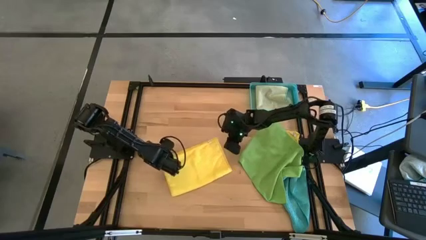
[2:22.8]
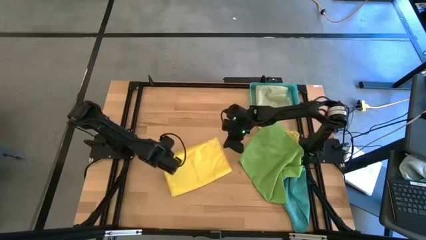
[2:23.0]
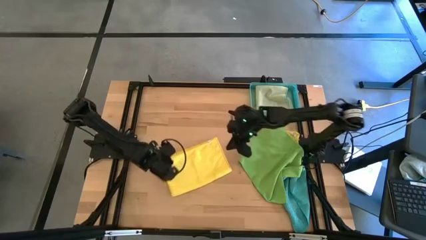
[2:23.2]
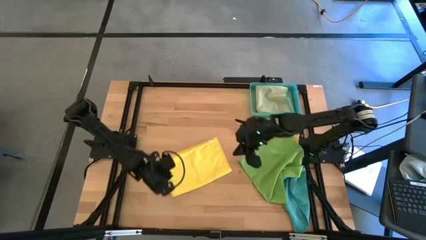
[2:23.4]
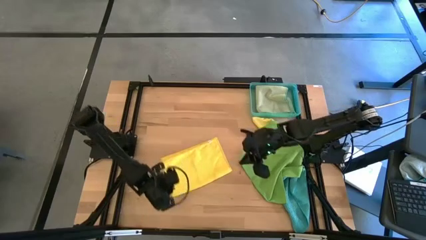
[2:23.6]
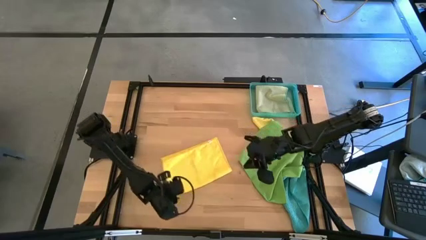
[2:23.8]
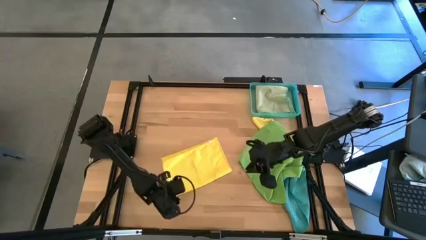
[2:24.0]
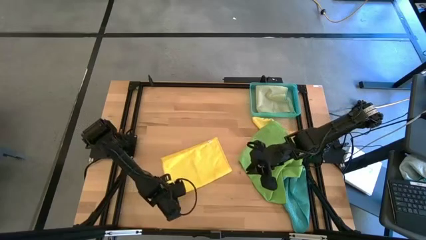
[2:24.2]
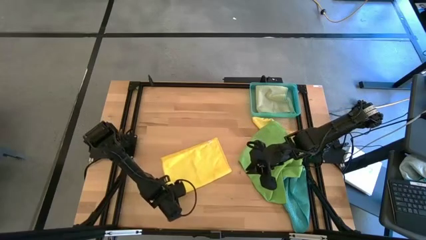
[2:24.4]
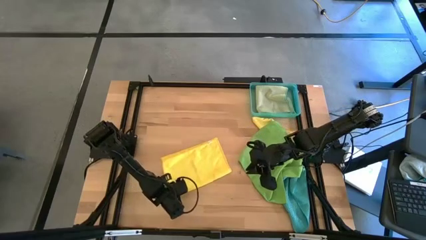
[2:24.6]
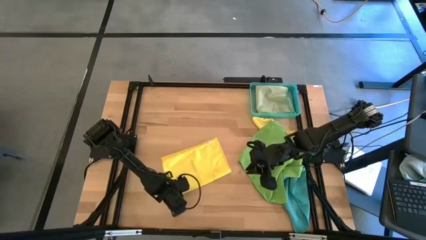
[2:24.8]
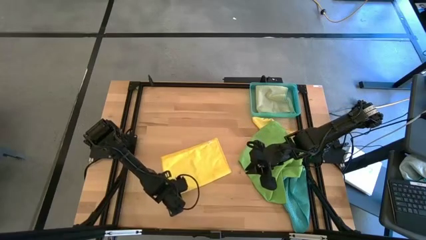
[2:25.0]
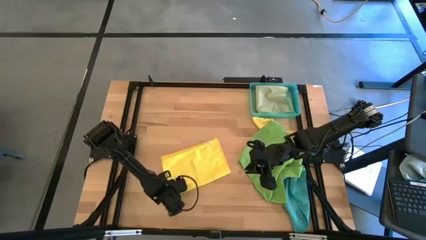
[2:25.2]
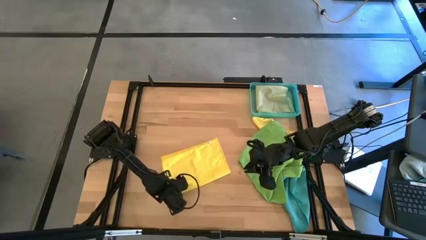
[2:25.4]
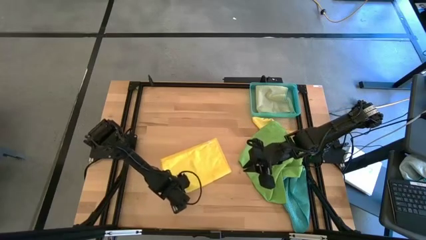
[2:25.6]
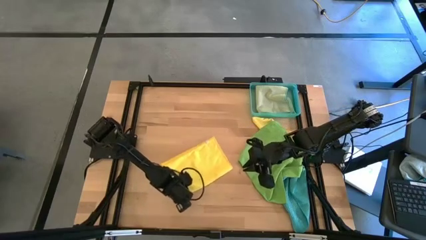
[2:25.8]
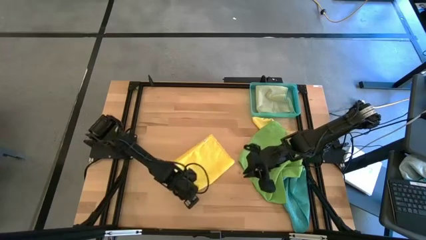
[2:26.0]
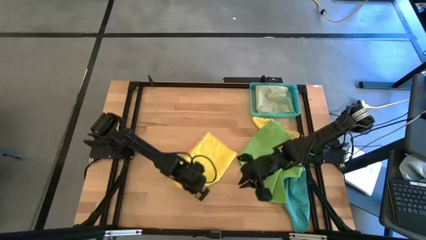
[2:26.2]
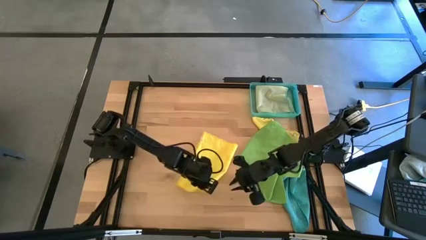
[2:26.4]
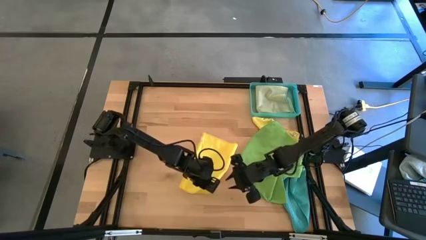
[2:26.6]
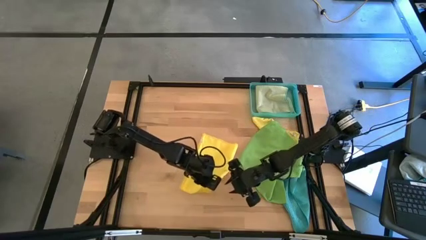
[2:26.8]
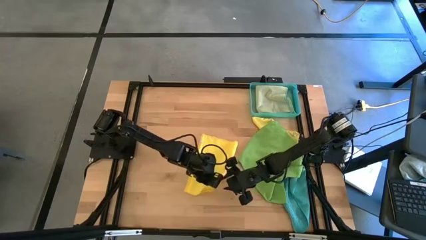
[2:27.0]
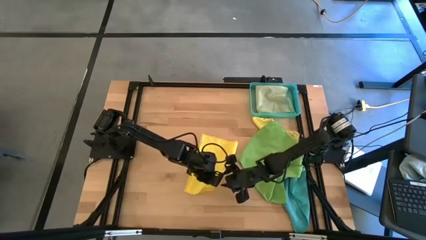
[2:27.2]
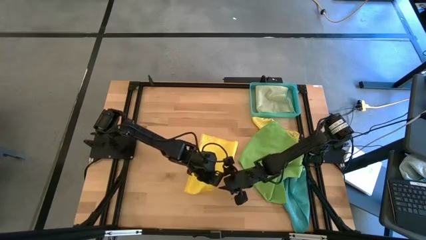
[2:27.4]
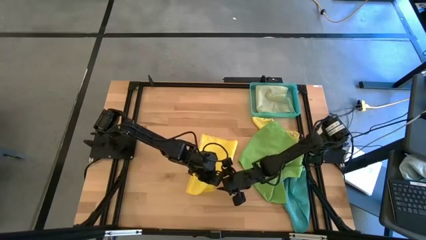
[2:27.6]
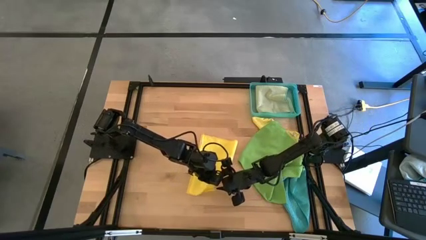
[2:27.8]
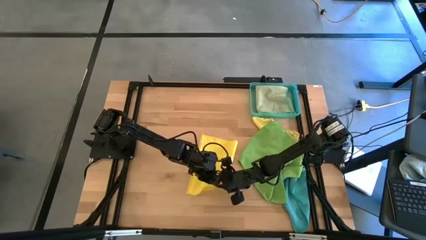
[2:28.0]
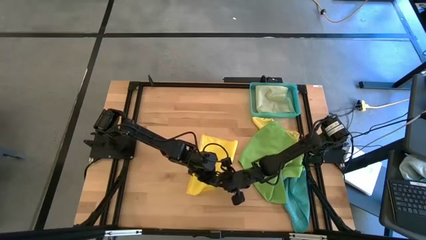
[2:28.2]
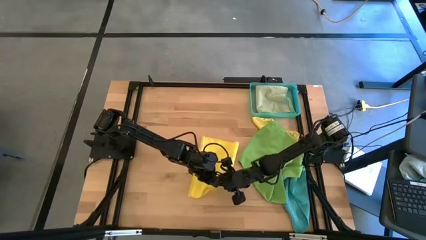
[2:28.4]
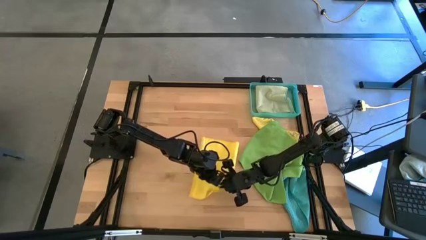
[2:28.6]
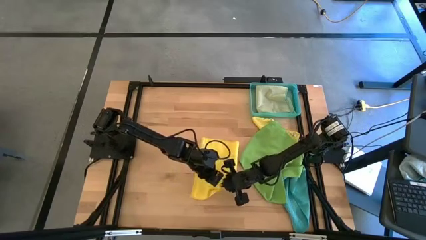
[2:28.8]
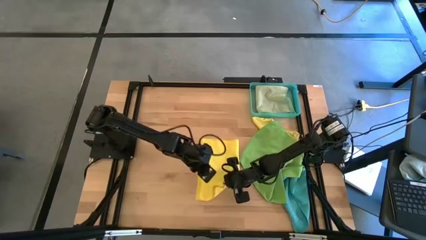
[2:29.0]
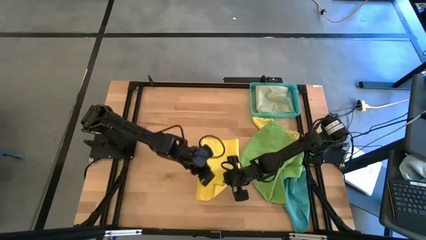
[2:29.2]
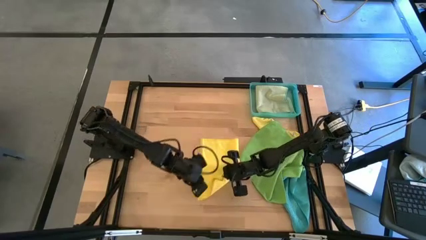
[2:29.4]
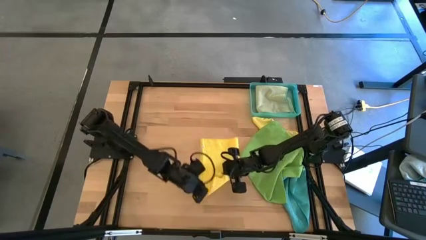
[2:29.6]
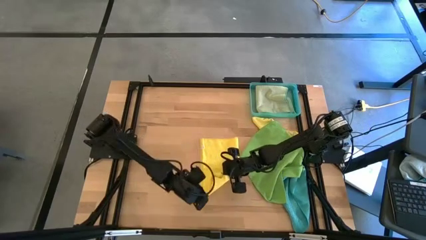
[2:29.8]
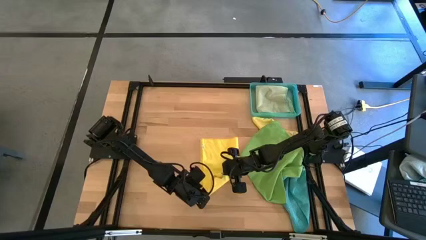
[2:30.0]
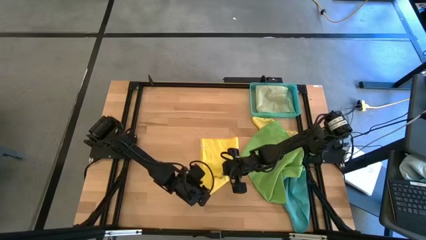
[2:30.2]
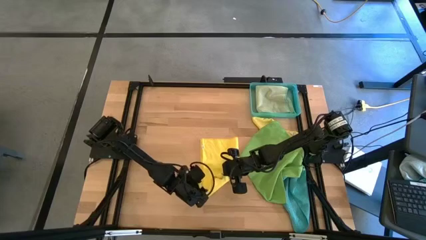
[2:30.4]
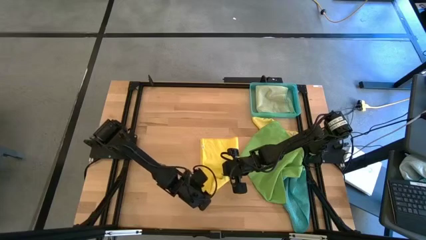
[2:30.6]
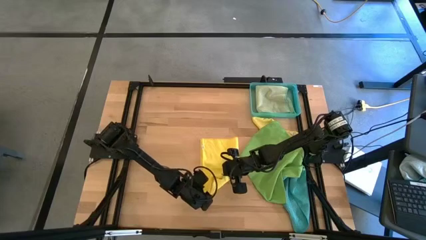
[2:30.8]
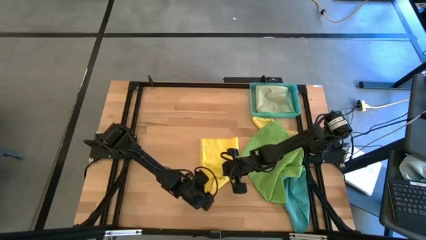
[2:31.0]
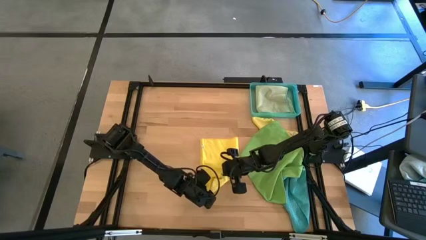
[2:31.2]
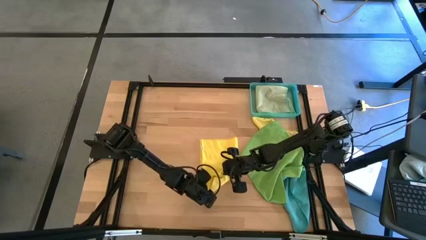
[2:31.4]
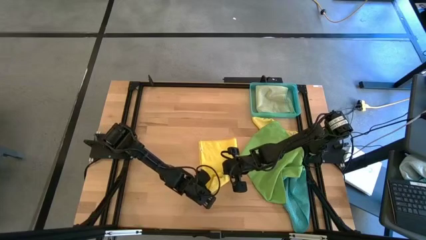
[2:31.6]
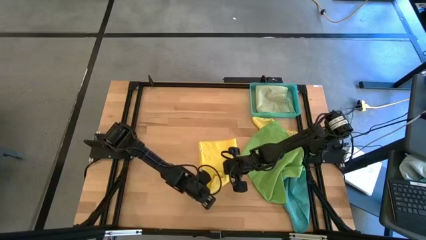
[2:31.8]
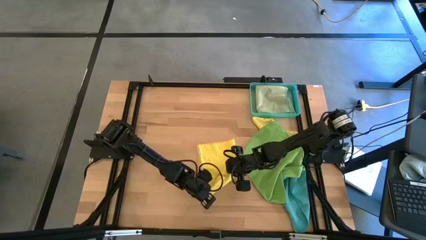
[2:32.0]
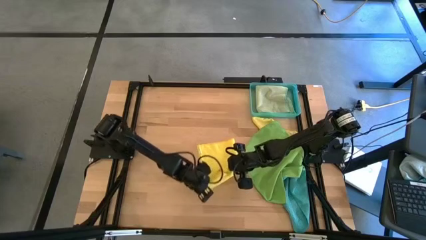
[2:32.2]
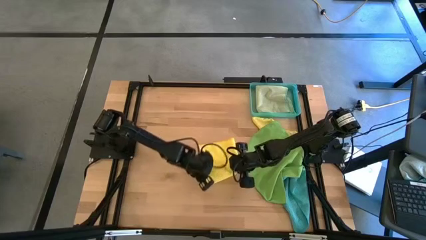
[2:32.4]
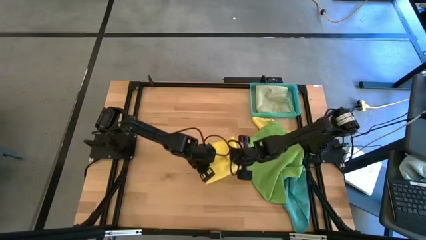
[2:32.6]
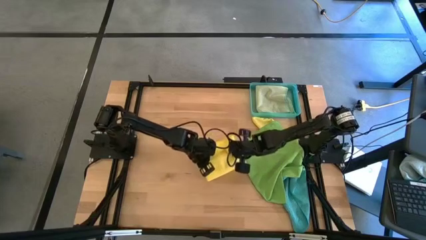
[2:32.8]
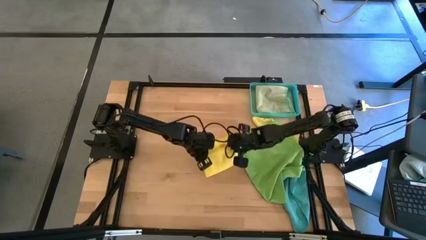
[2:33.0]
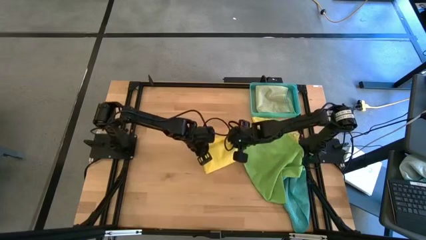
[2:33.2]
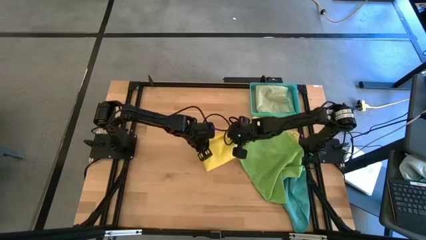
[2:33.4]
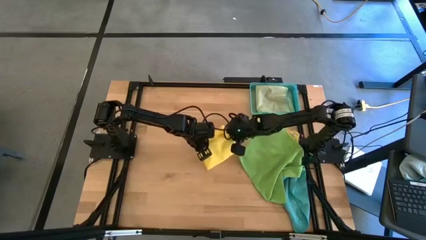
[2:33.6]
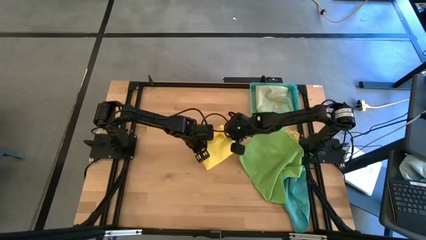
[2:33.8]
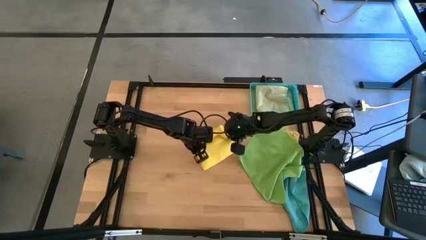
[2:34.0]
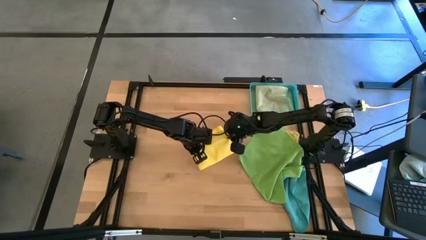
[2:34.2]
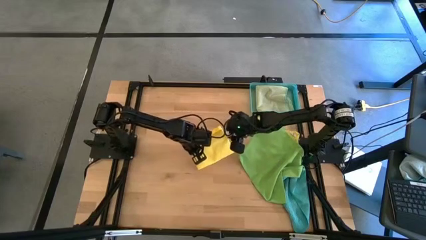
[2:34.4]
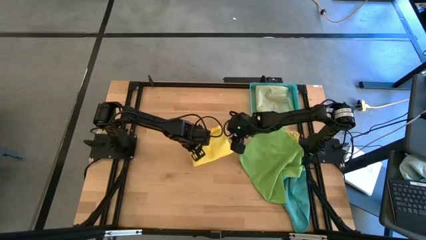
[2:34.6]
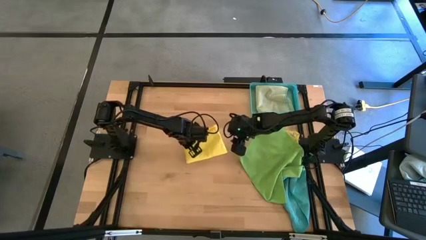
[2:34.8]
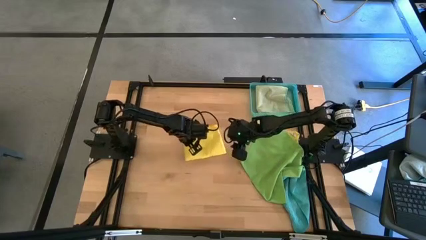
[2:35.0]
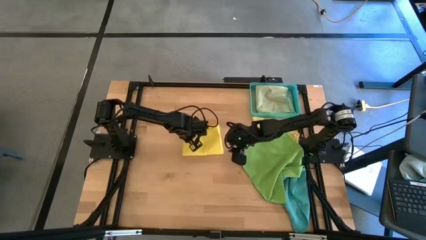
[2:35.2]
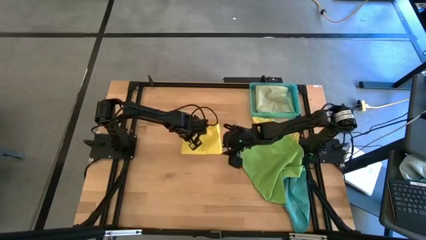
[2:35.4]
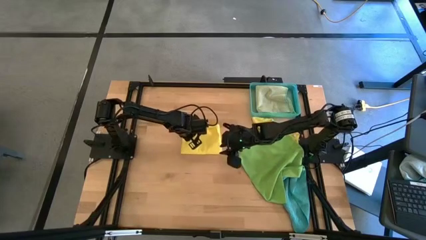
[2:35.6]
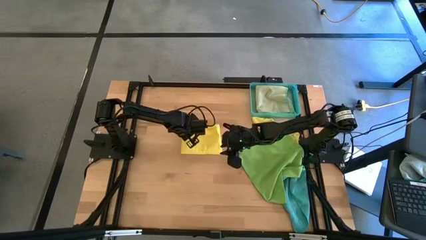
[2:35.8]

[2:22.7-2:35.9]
Task: Fold microfiber towels
Fold the left yellow microfiber cloth
